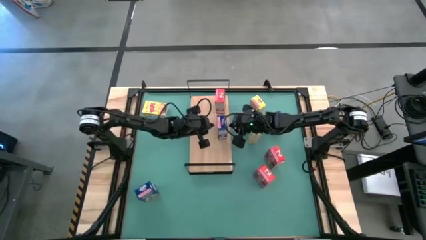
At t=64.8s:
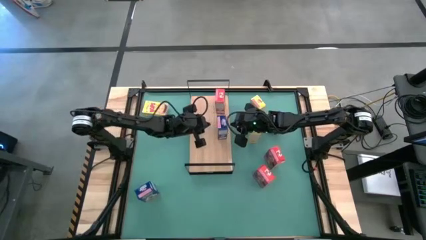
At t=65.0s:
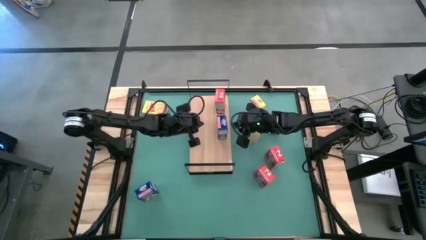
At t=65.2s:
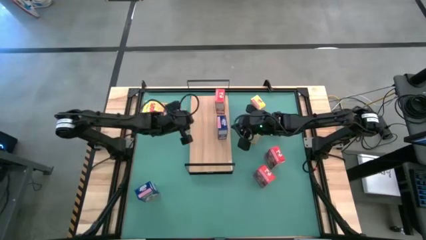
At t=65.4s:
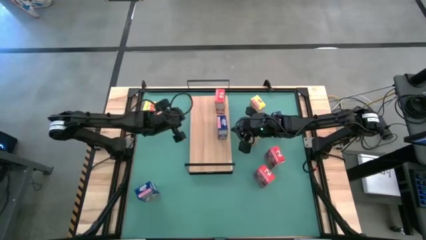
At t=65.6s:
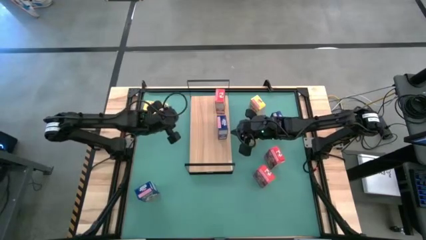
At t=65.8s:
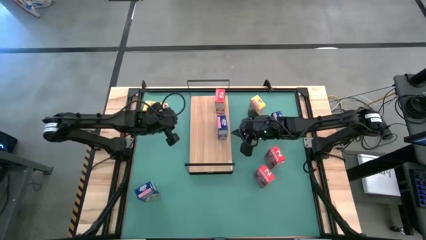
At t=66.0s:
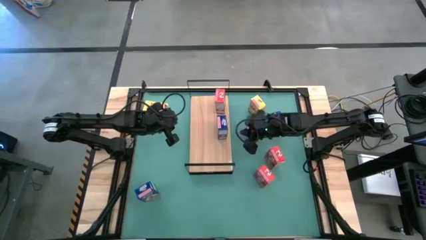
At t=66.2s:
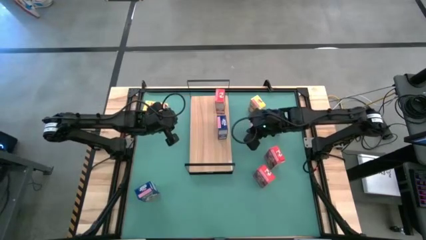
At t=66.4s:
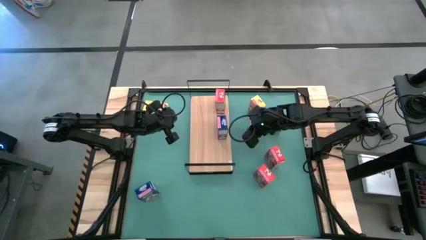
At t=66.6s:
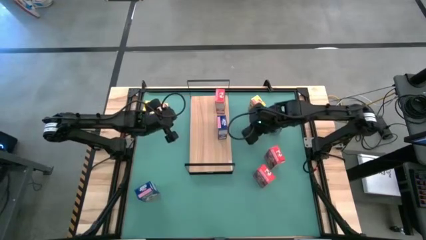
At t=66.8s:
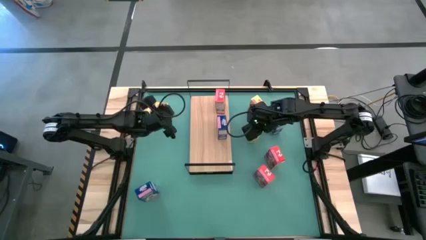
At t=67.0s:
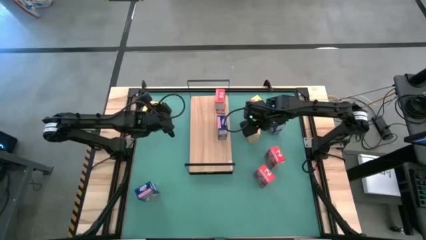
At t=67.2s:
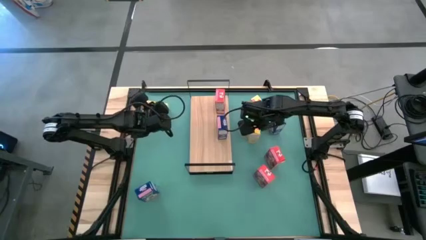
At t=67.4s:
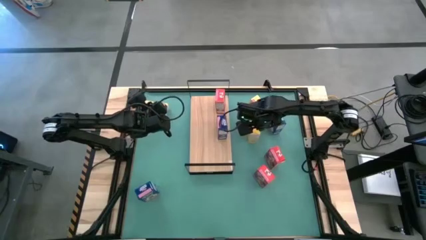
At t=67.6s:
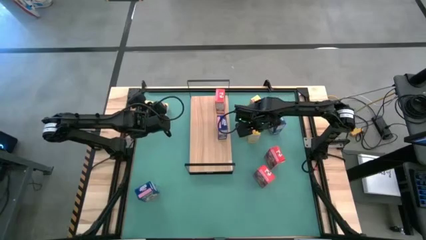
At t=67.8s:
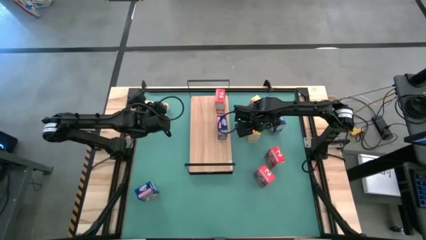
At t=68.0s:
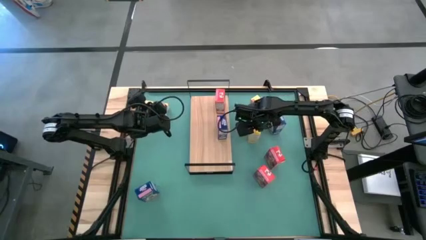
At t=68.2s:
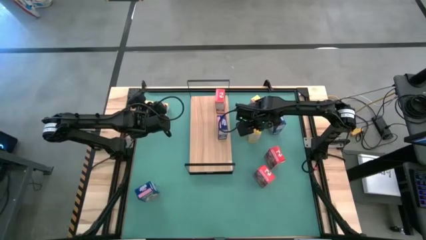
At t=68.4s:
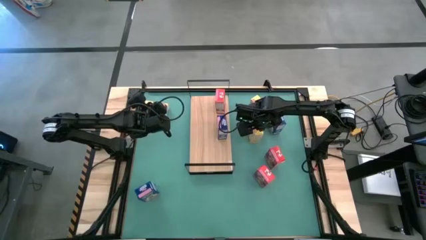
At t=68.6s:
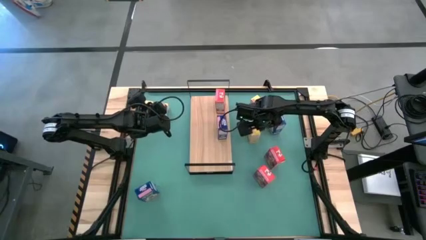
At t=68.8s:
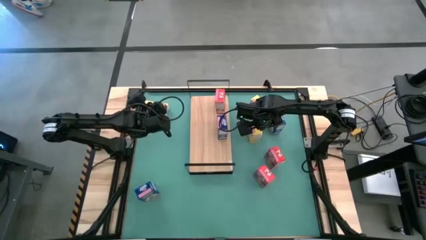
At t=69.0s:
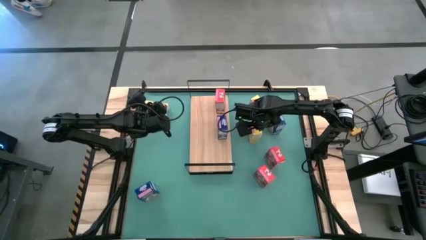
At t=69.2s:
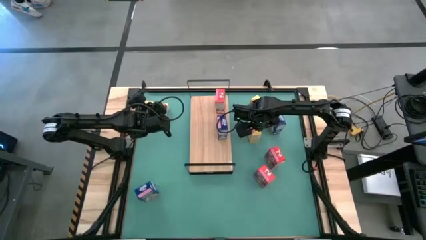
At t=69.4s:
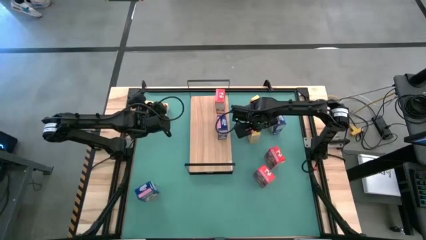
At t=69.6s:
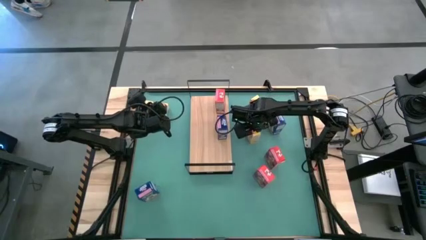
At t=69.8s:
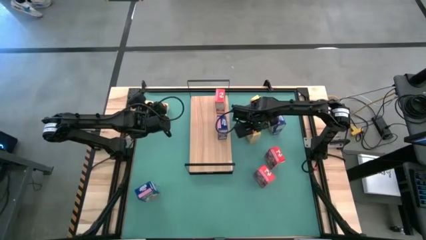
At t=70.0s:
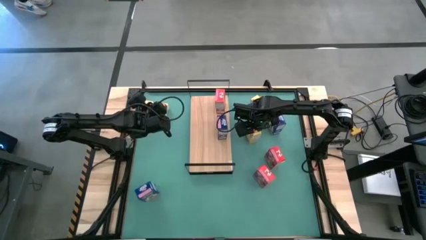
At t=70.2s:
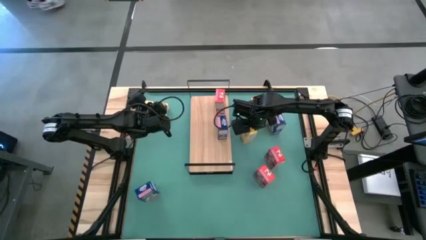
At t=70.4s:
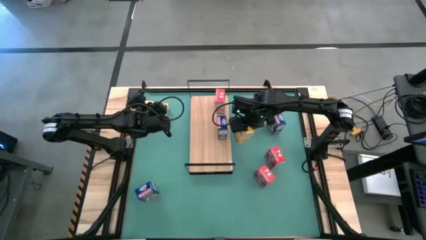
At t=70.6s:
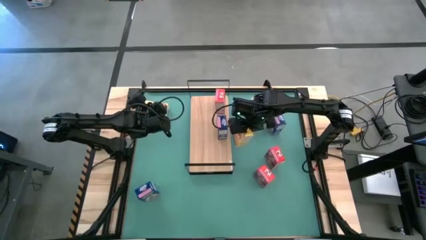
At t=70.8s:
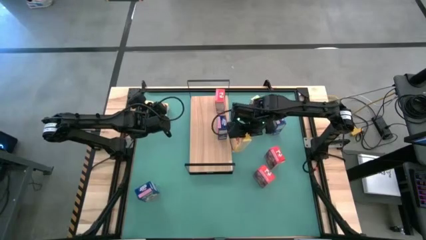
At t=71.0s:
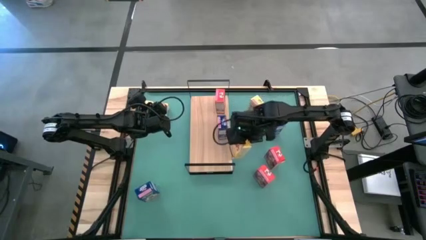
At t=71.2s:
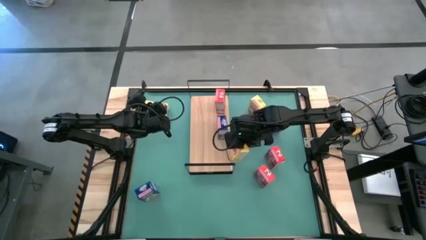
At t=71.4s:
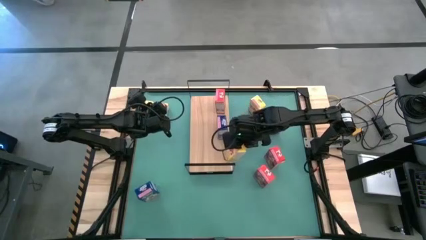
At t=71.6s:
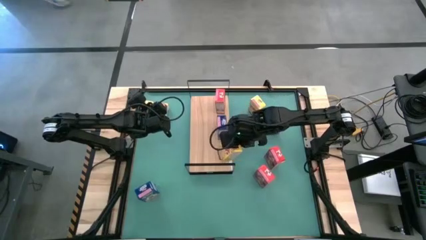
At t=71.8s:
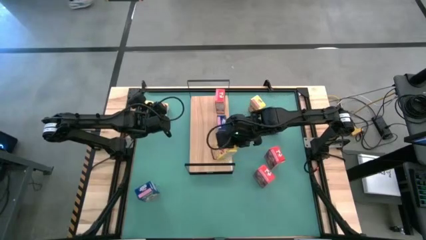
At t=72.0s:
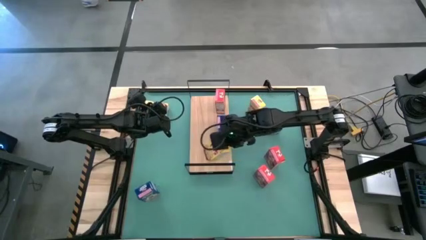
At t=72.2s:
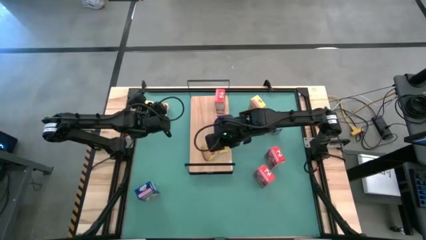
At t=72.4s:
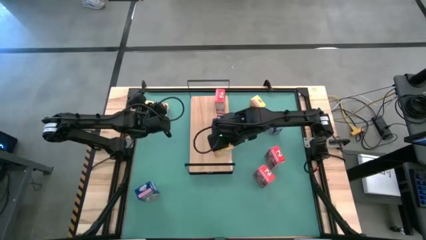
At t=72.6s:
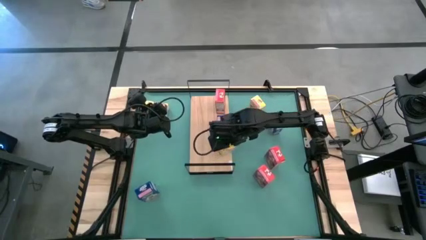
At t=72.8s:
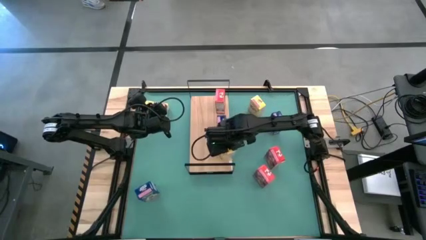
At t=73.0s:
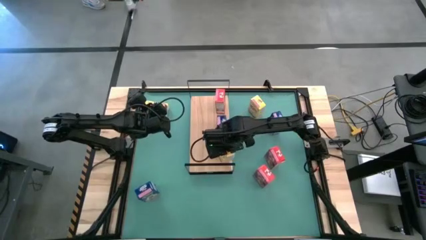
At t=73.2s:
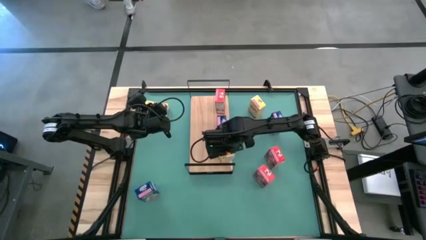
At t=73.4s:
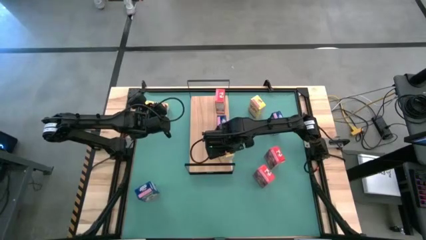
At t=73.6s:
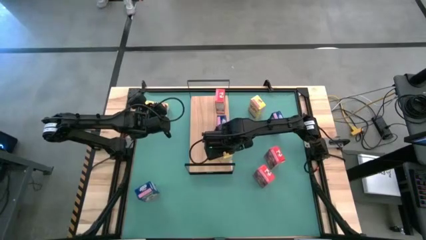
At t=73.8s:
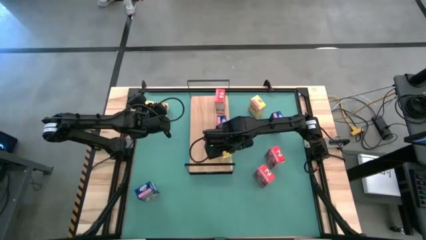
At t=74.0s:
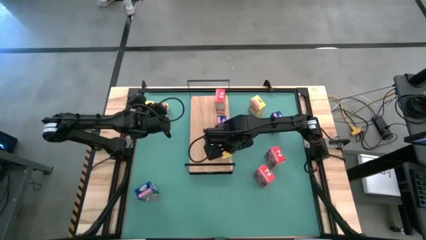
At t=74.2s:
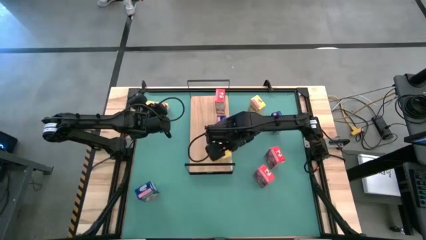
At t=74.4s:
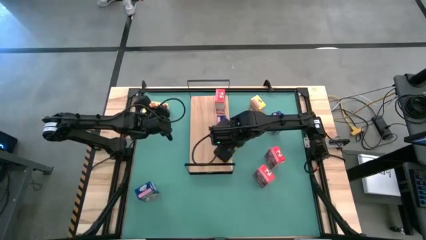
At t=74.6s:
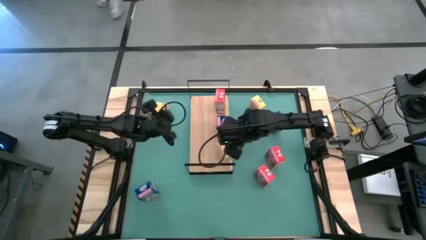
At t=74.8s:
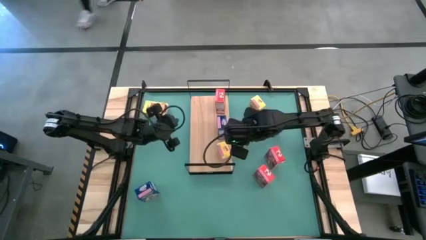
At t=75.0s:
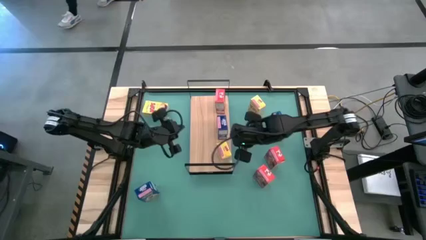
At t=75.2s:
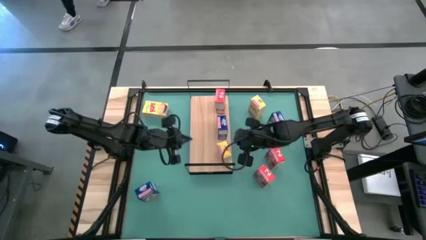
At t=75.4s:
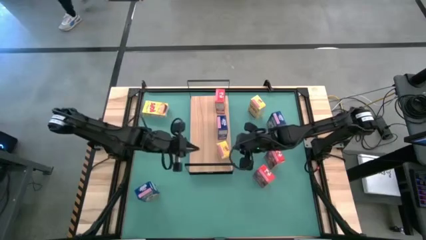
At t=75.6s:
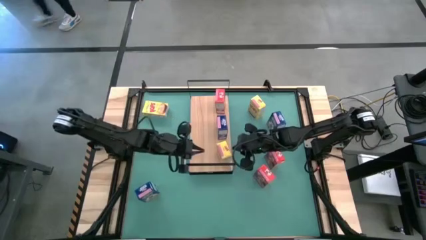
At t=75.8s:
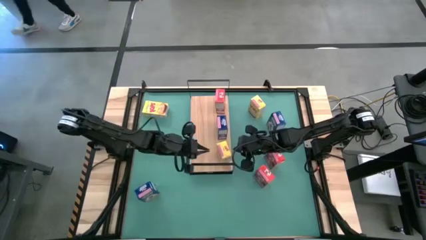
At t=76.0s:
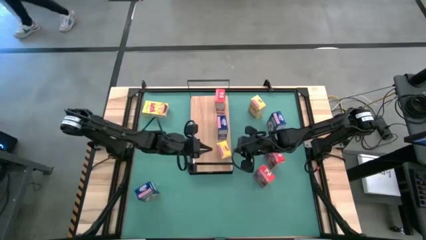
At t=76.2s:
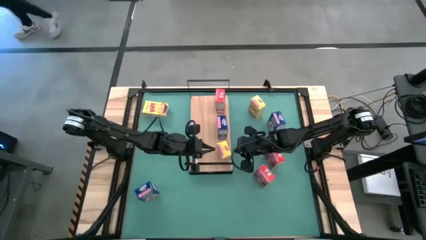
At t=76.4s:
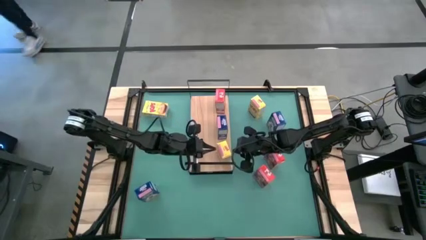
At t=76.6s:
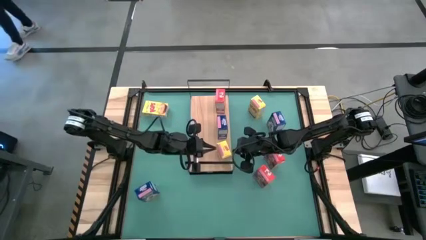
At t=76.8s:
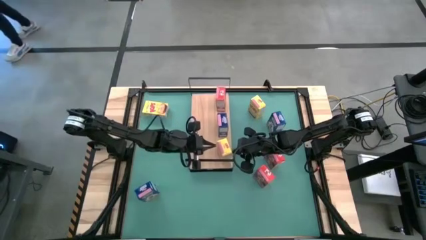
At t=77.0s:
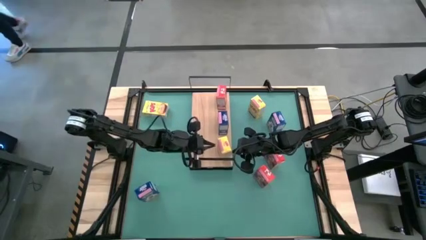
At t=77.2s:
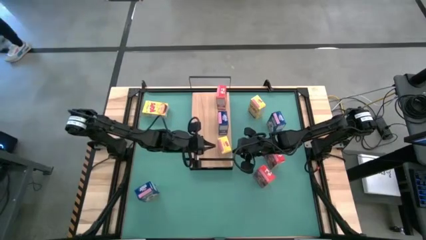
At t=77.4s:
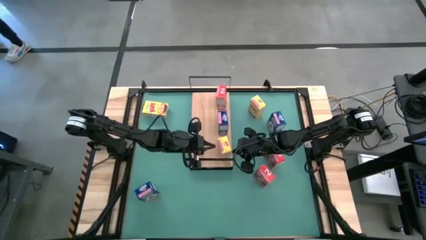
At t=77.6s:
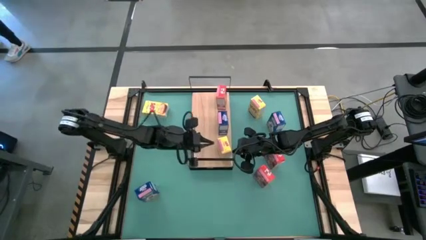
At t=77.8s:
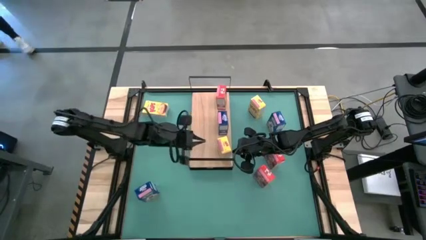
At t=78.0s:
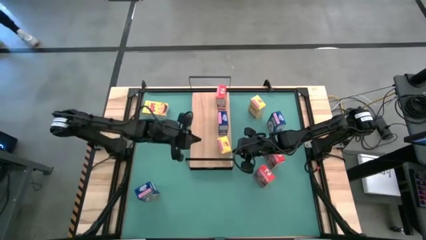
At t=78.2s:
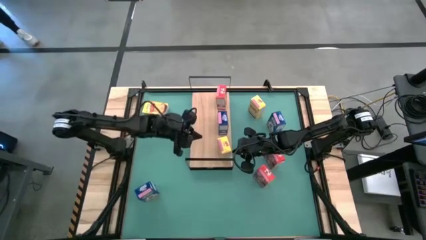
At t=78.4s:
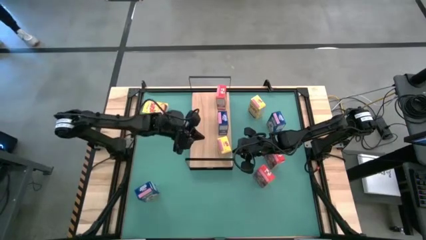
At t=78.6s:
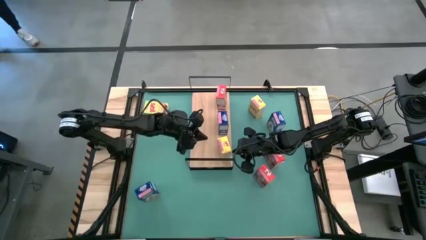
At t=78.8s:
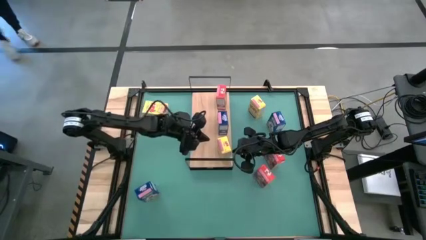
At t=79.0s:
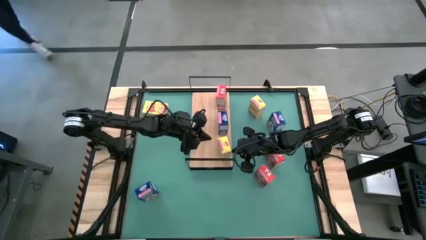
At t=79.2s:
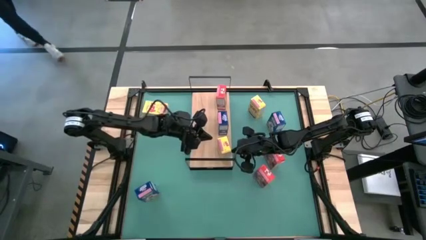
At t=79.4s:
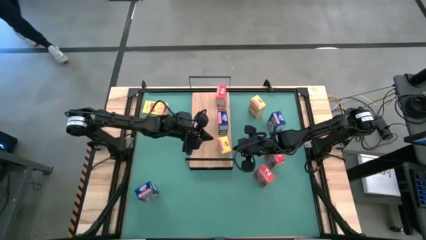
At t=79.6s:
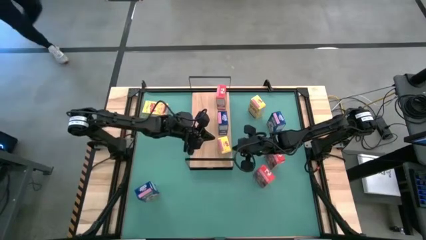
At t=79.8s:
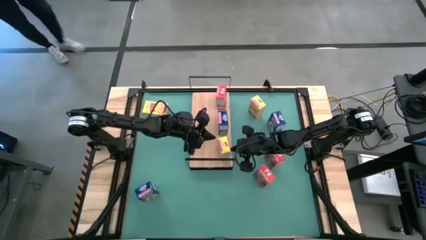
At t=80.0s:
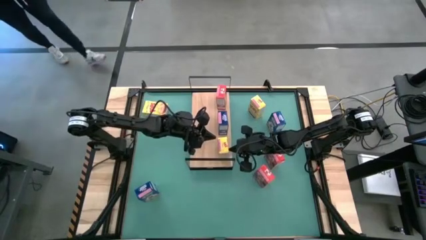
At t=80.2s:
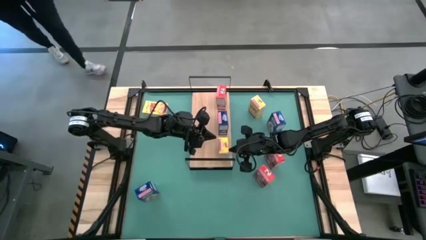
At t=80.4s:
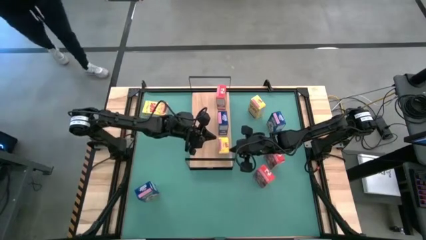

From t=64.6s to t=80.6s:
Task: Stack cereal on shelf
Put the bottom yellow cereal box on the shelf
